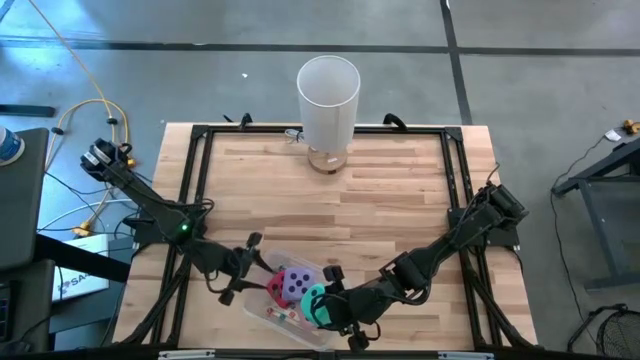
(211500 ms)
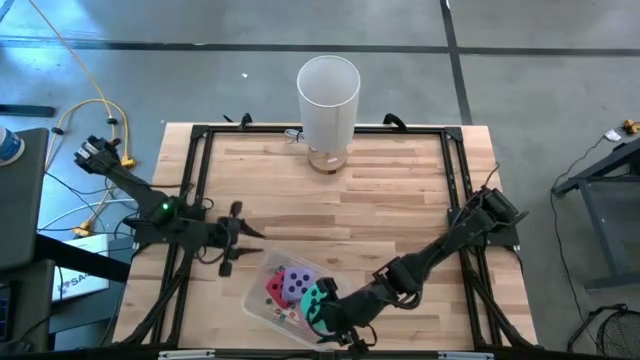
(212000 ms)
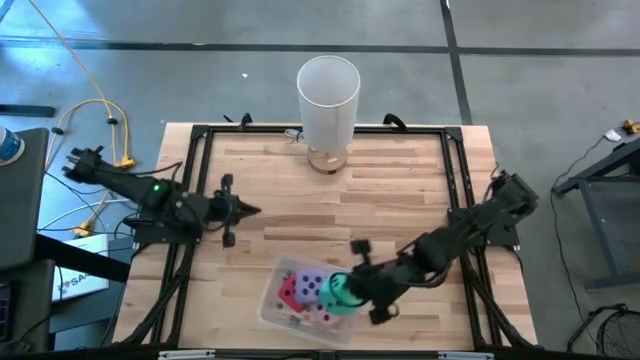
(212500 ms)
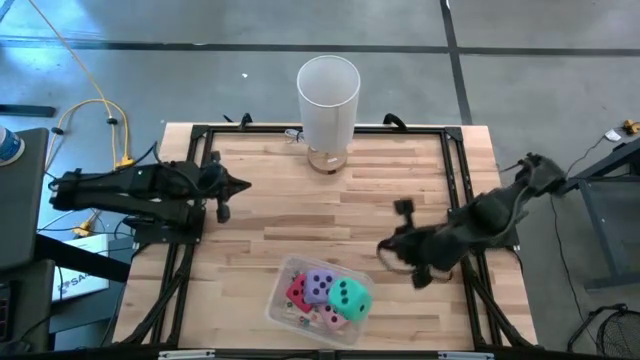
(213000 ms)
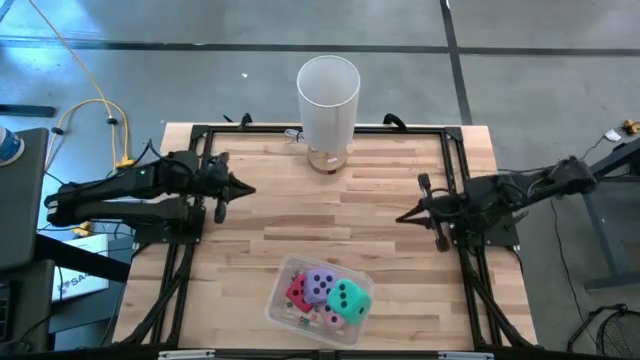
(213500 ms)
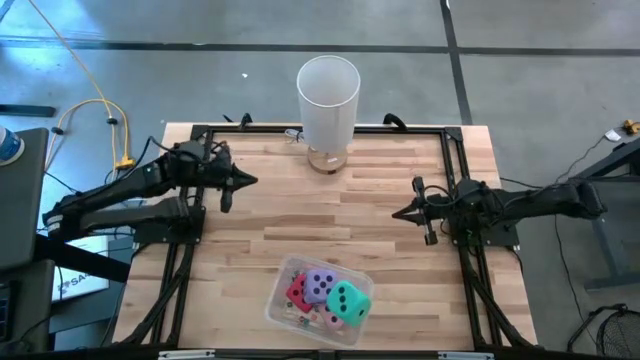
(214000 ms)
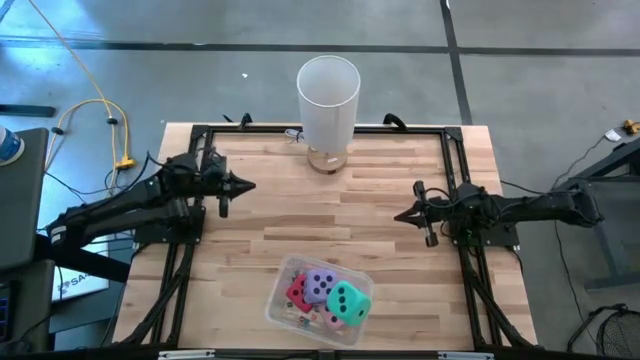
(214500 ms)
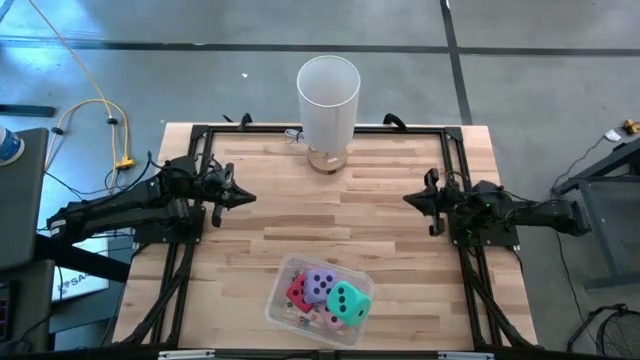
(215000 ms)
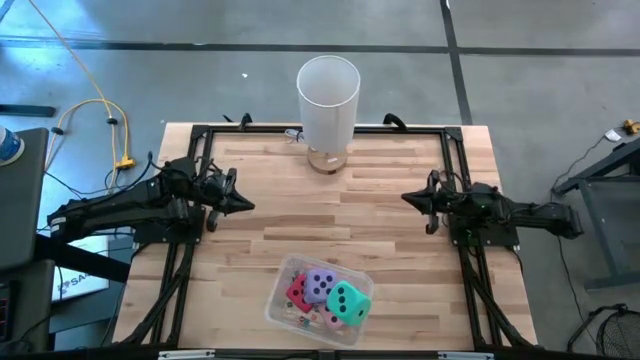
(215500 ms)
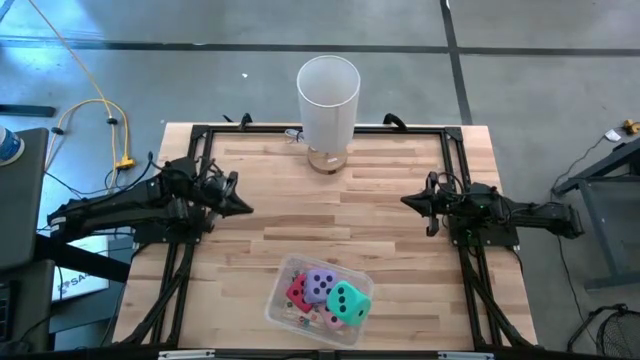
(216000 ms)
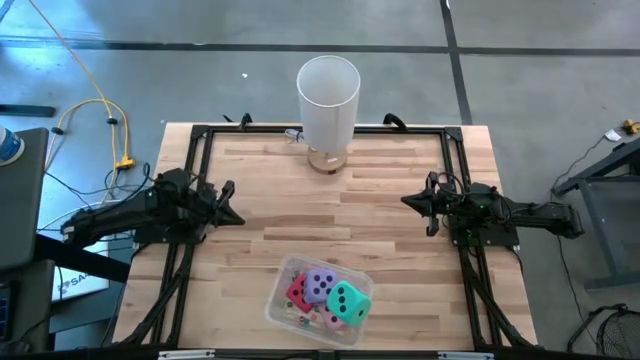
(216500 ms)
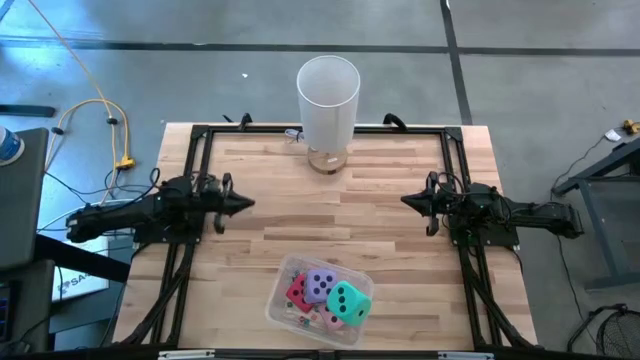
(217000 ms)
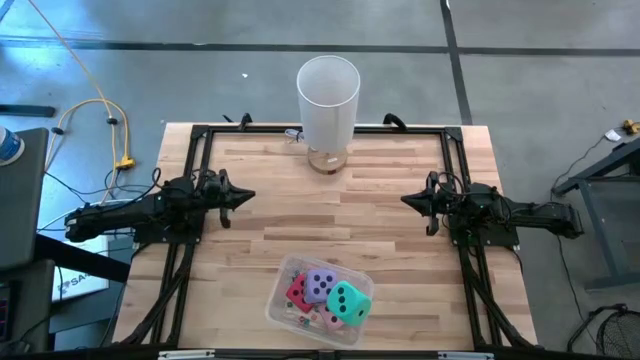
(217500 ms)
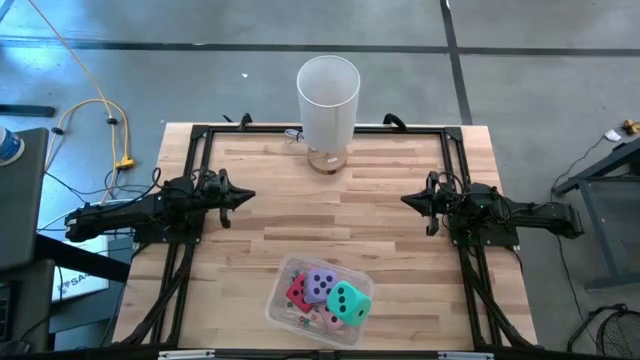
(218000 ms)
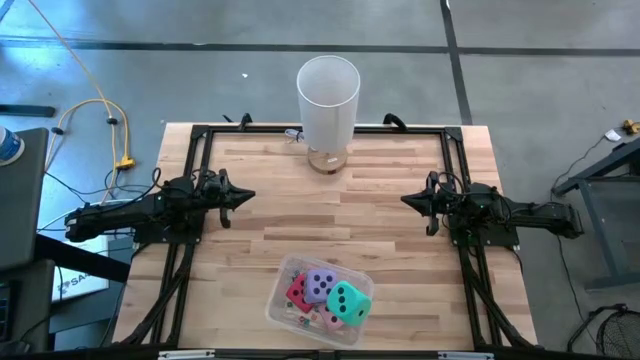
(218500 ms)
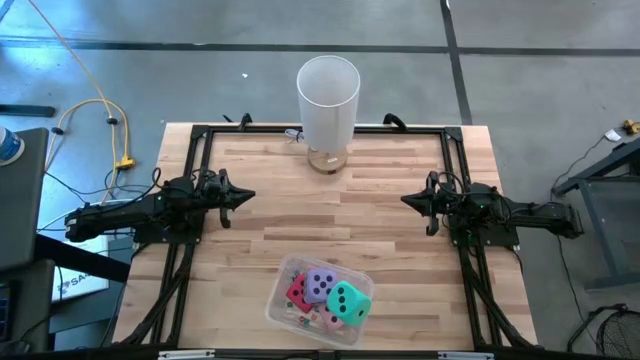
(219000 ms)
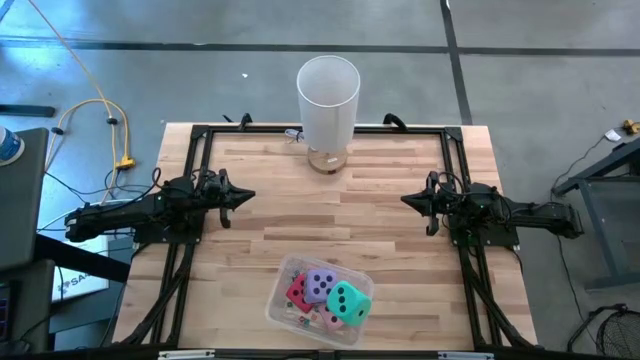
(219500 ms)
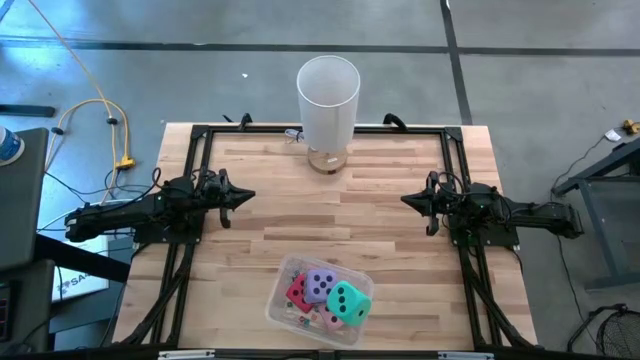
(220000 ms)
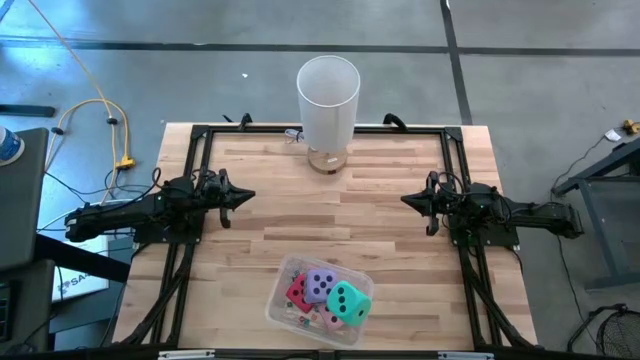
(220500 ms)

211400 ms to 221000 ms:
Task: Pick & Place Dice
Return to Home Position

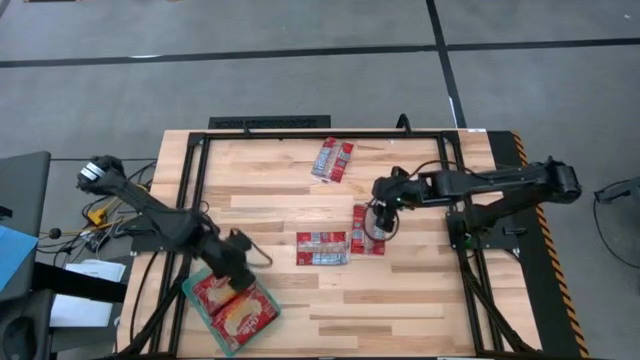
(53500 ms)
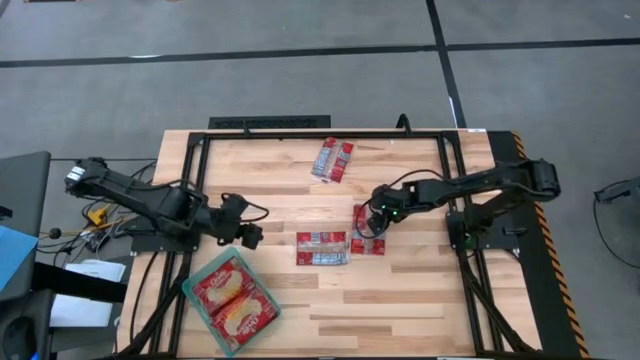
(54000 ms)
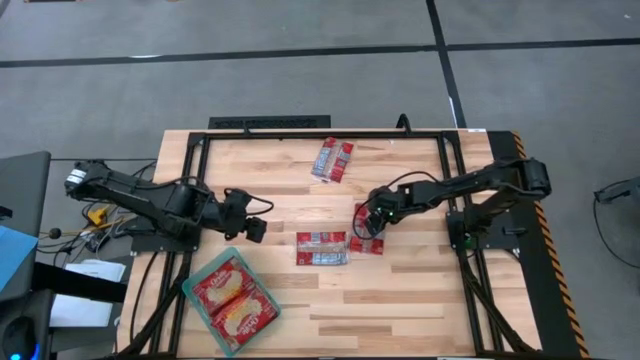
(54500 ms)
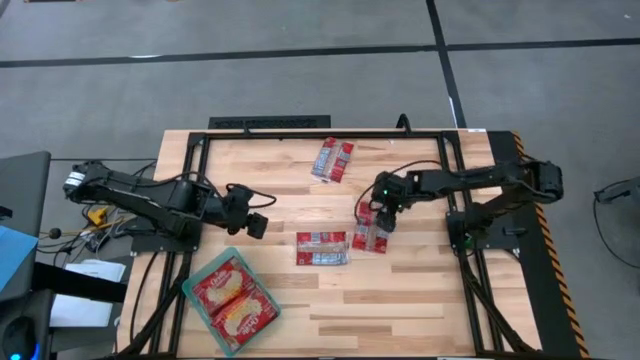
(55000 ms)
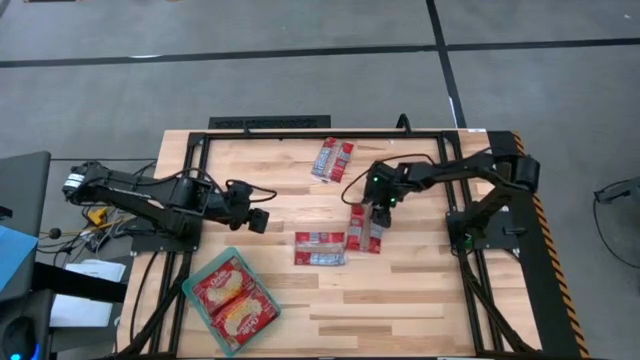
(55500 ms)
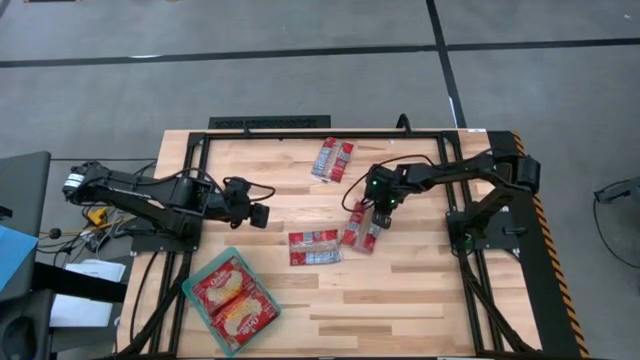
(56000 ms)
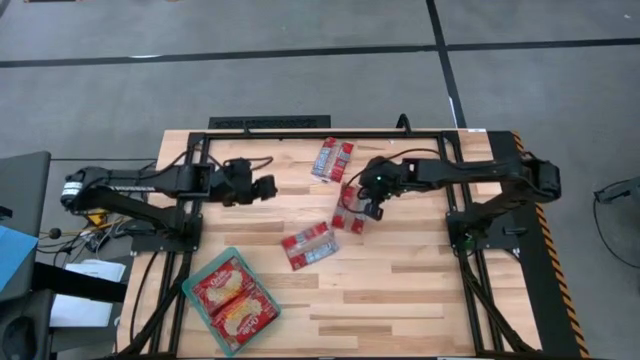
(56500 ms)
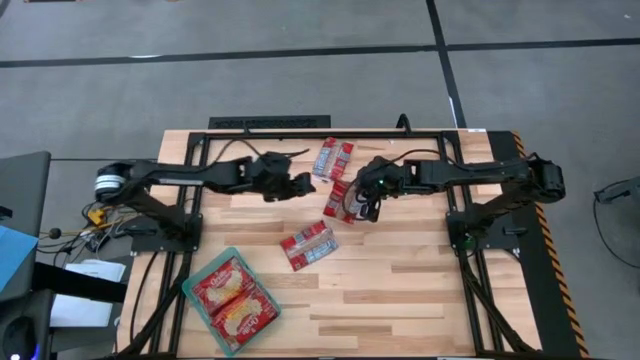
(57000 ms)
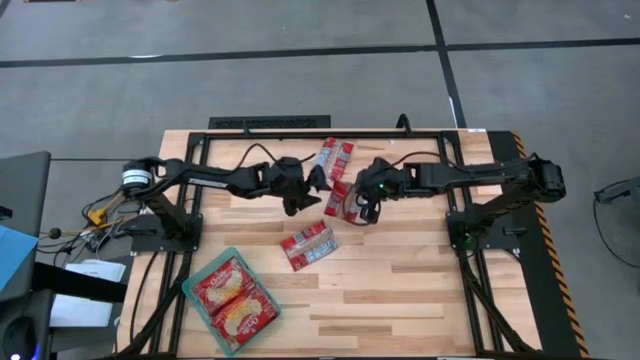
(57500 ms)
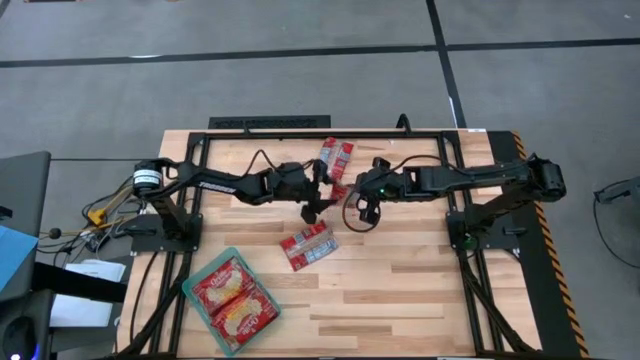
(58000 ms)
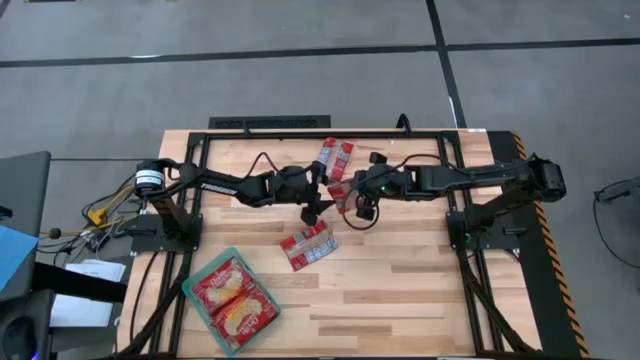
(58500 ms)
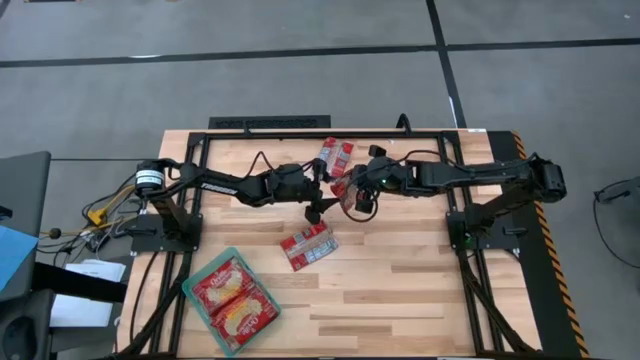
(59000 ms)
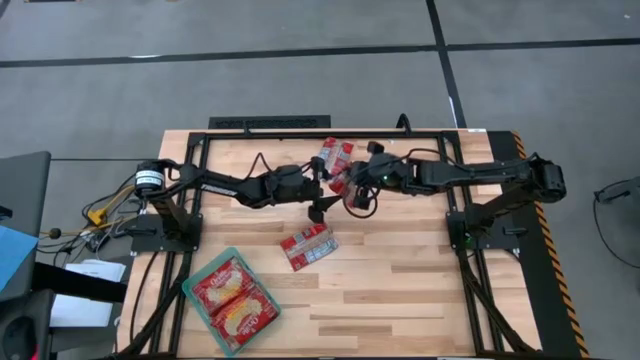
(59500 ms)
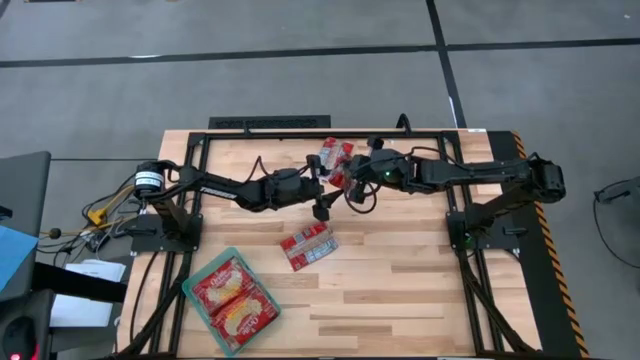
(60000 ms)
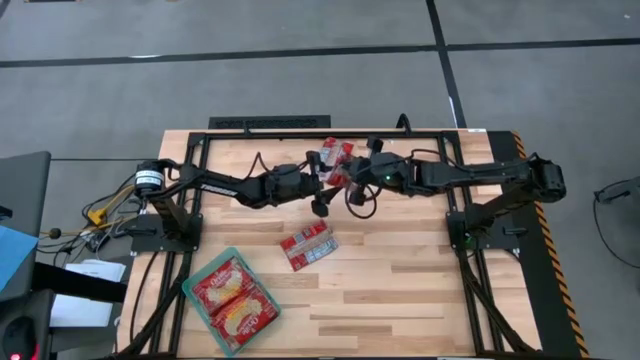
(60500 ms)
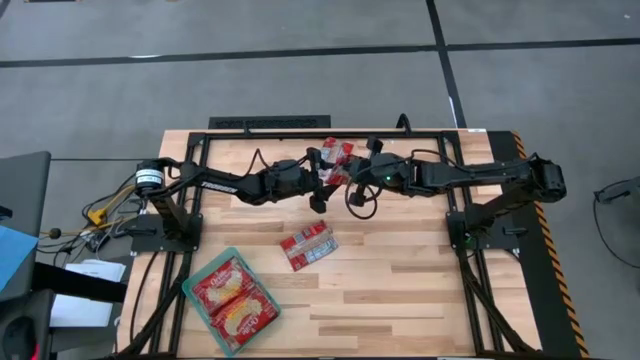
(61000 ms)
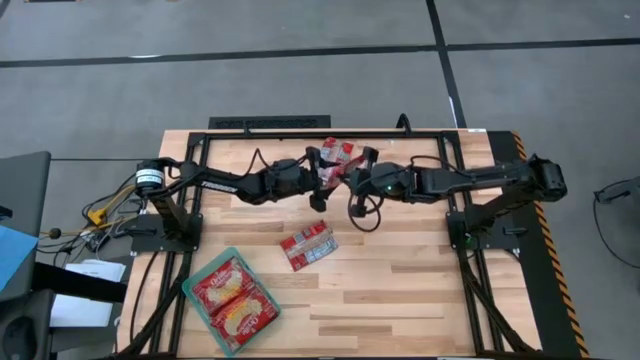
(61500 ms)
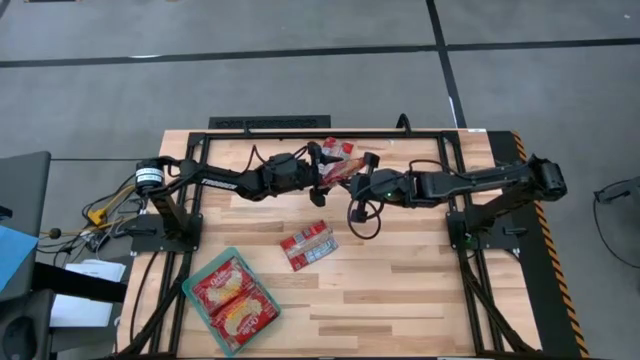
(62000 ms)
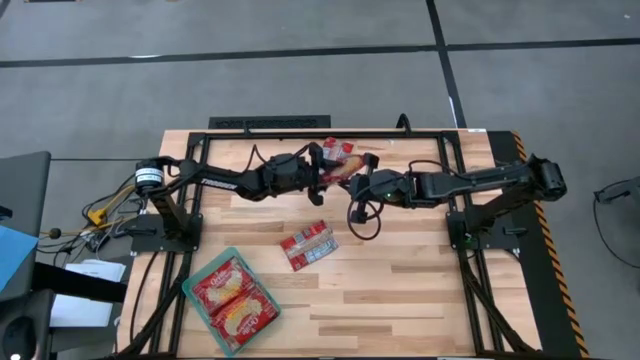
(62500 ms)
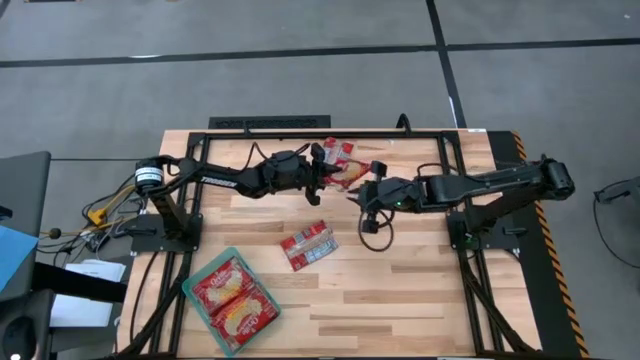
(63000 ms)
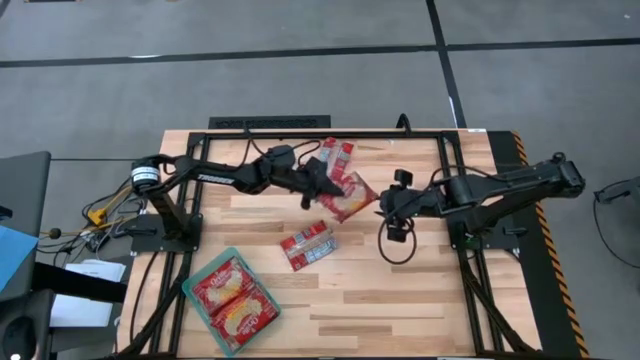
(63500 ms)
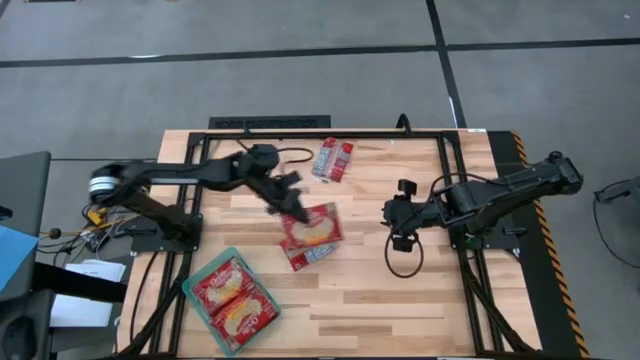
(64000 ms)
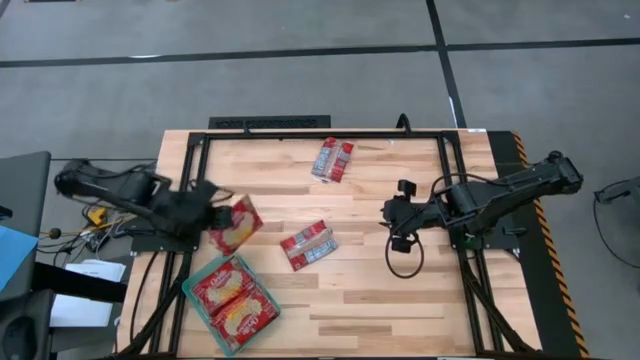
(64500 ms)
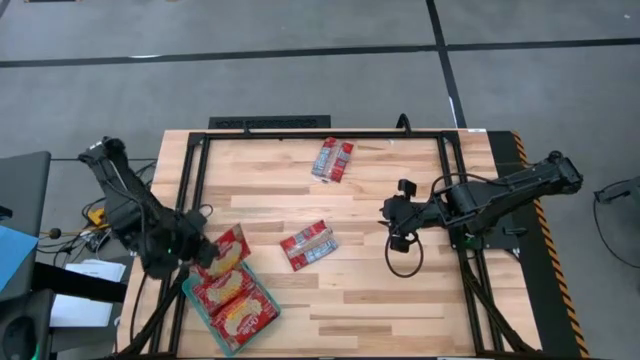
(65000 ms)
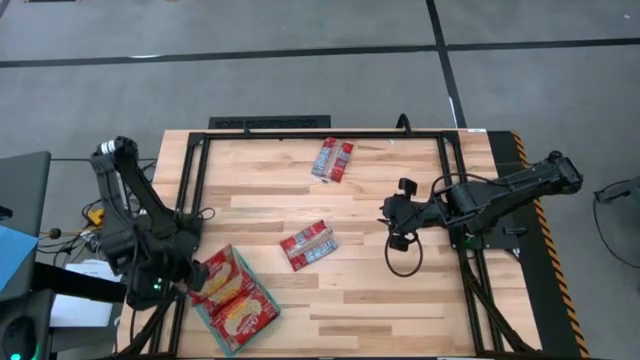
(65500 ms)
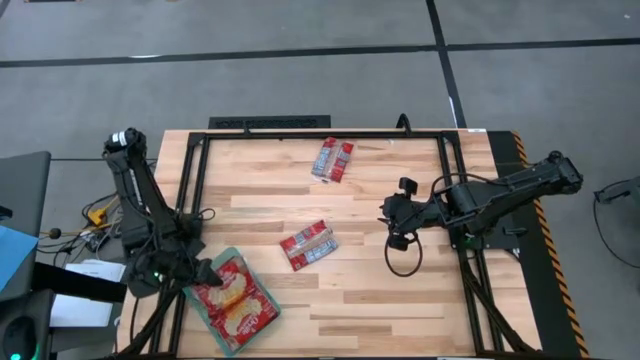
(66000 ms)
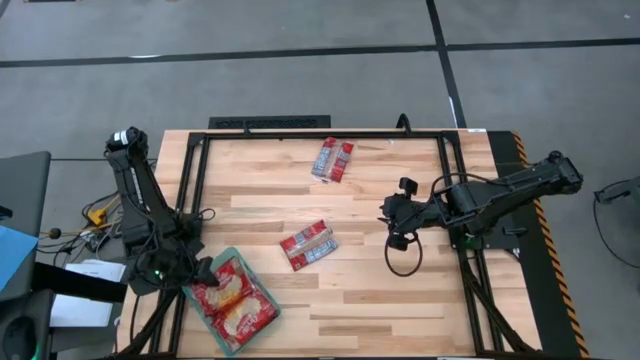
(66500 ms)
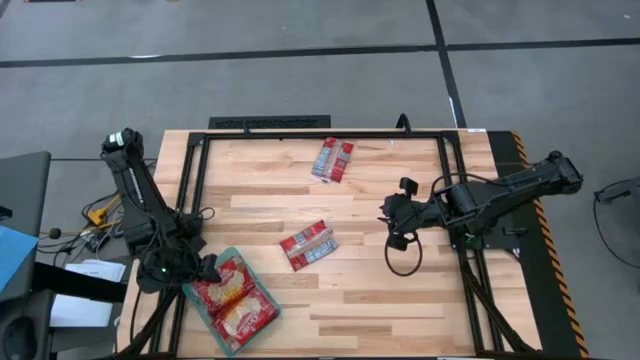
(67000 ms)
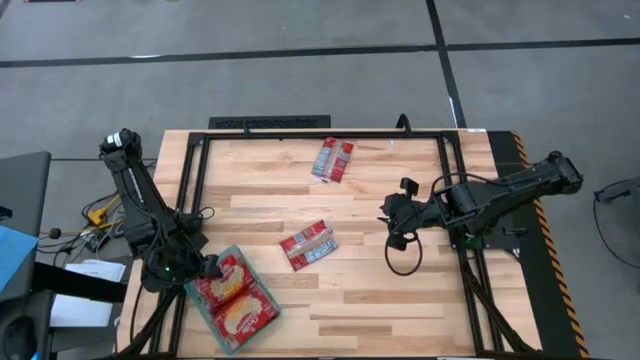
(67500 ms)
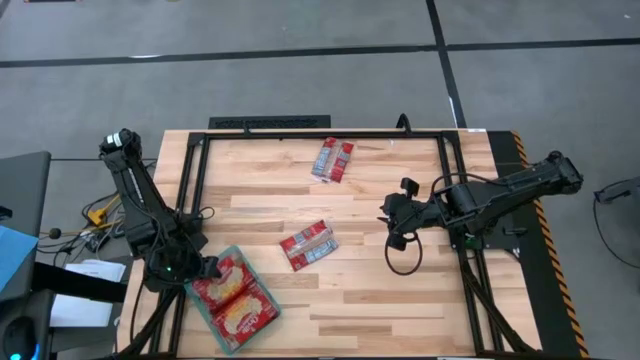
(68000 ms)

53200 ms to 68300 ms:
Task: Sort popcorn bags into baskets
Put the red popcorn bag into the green bin
